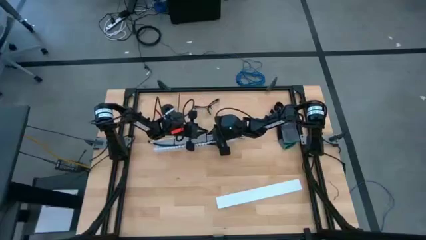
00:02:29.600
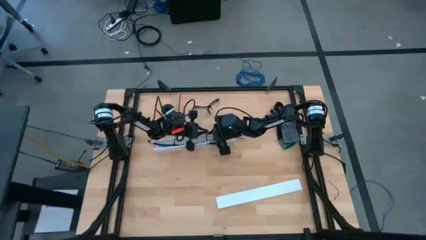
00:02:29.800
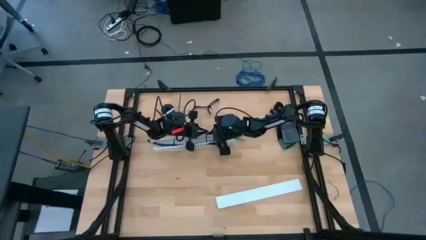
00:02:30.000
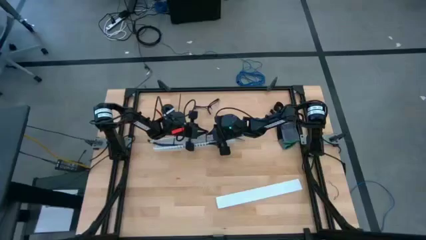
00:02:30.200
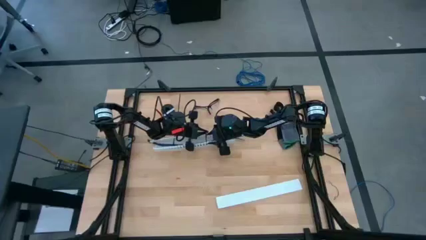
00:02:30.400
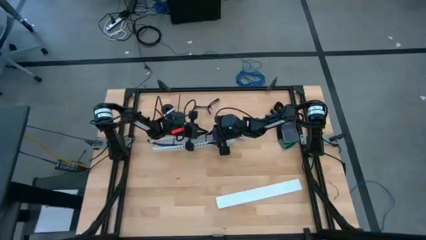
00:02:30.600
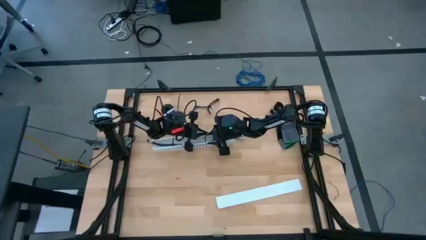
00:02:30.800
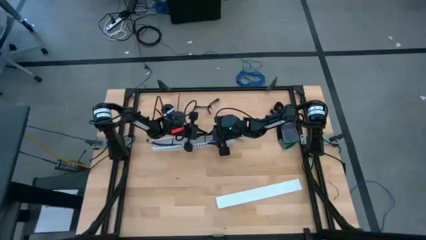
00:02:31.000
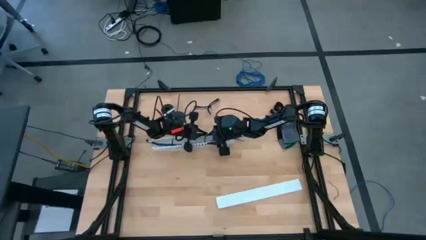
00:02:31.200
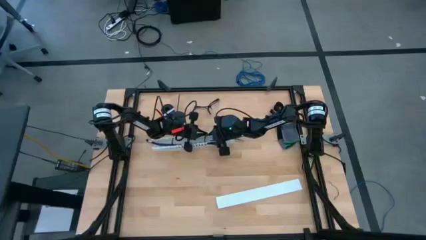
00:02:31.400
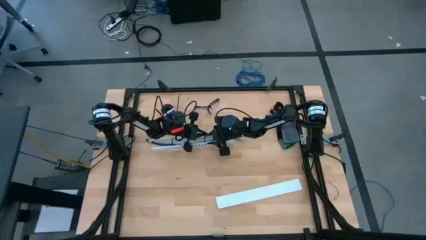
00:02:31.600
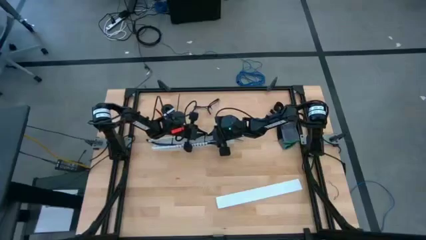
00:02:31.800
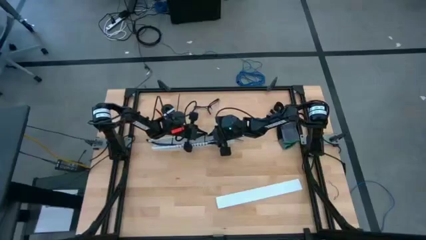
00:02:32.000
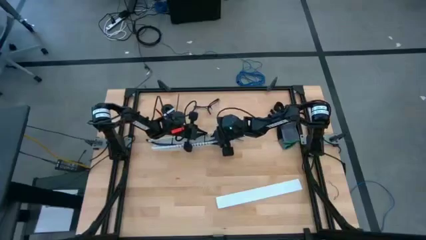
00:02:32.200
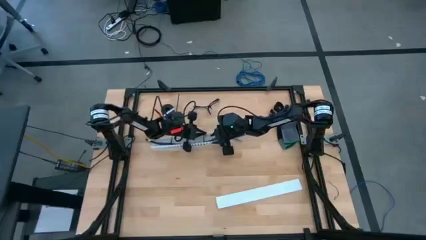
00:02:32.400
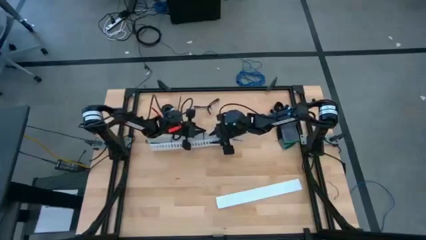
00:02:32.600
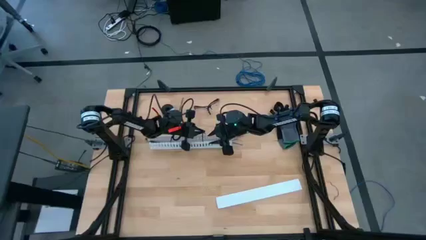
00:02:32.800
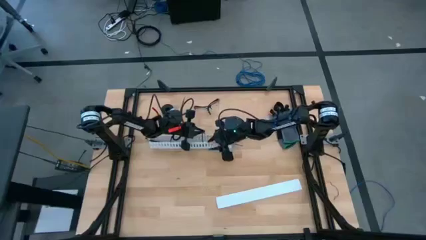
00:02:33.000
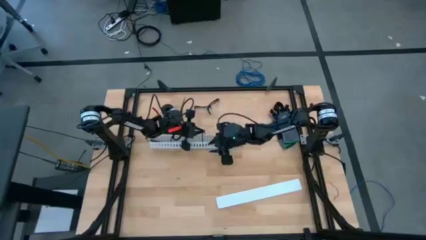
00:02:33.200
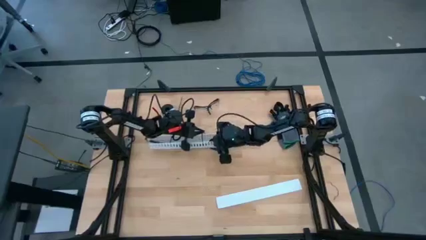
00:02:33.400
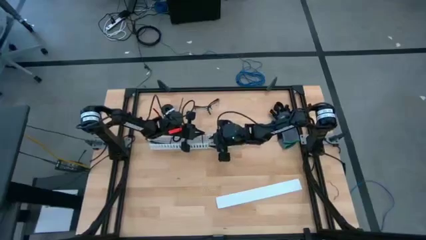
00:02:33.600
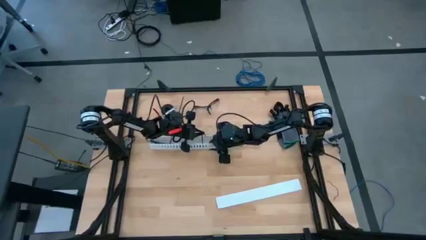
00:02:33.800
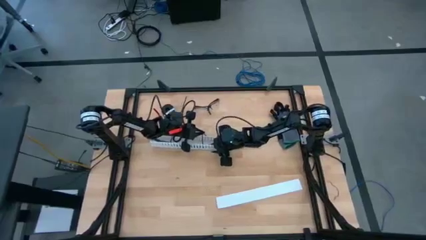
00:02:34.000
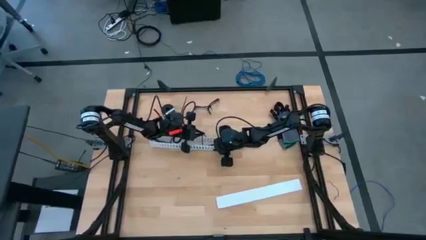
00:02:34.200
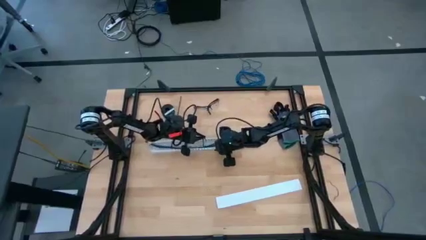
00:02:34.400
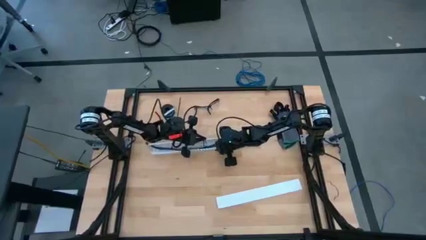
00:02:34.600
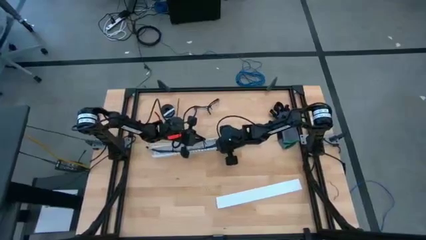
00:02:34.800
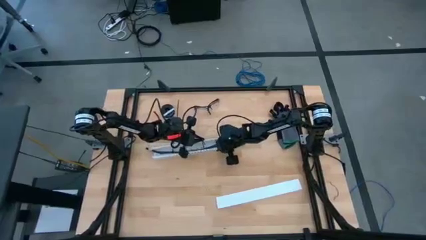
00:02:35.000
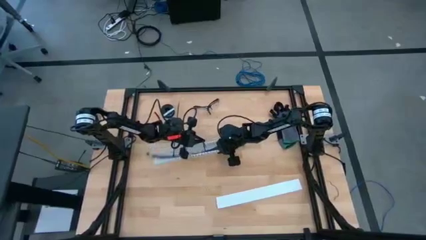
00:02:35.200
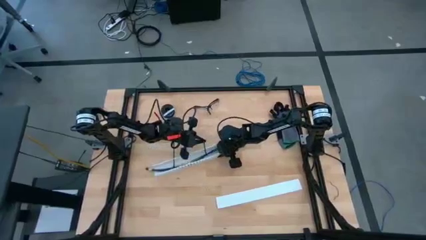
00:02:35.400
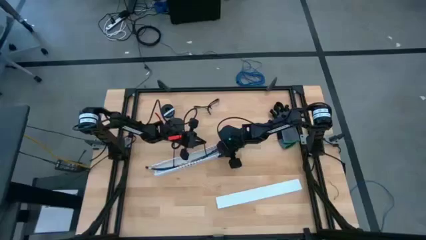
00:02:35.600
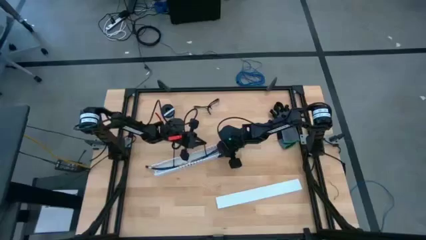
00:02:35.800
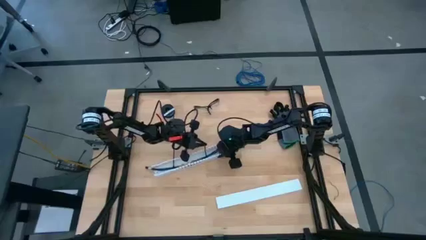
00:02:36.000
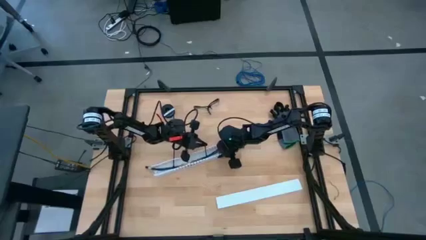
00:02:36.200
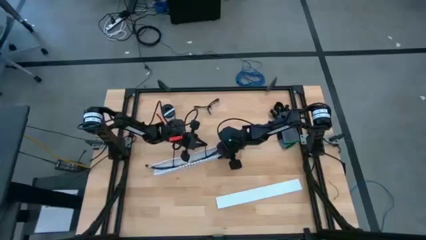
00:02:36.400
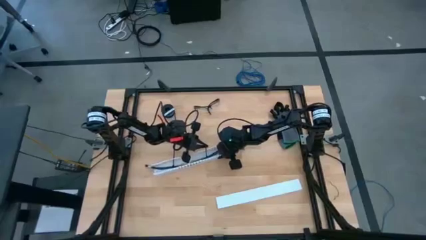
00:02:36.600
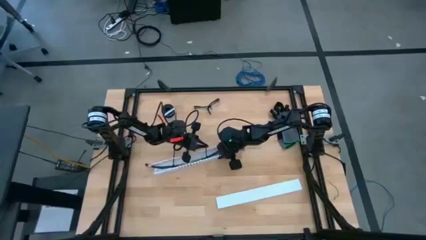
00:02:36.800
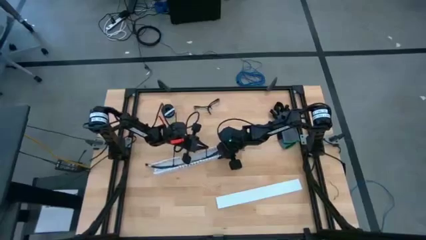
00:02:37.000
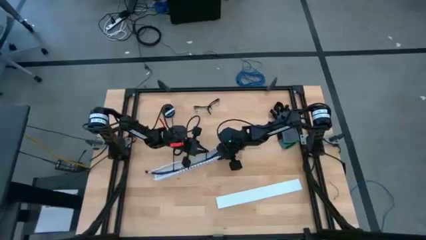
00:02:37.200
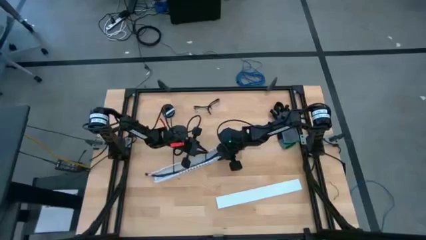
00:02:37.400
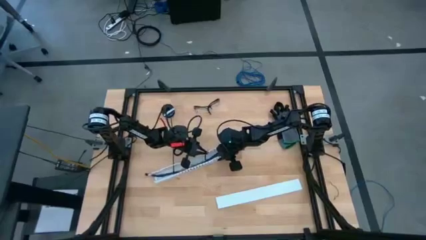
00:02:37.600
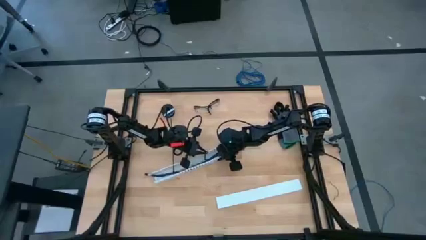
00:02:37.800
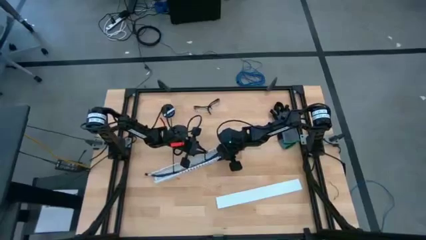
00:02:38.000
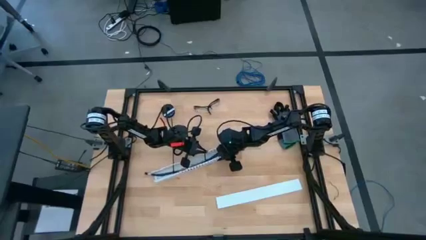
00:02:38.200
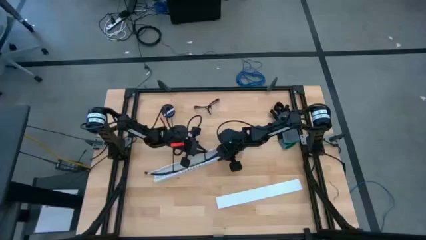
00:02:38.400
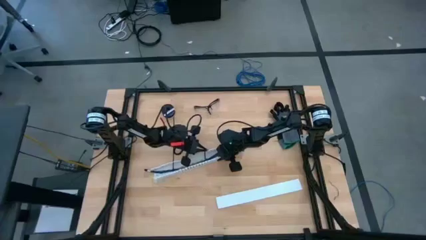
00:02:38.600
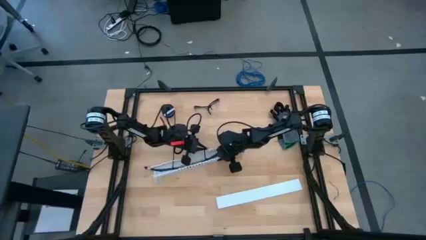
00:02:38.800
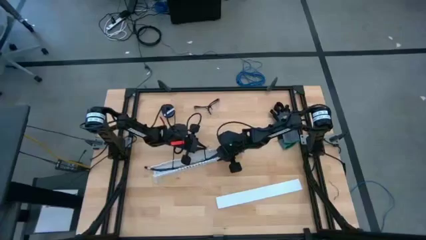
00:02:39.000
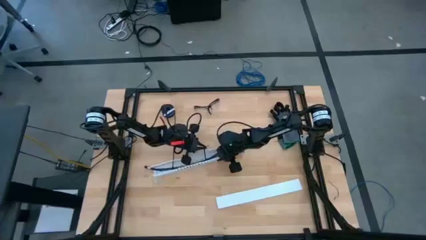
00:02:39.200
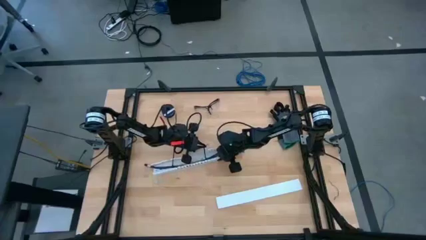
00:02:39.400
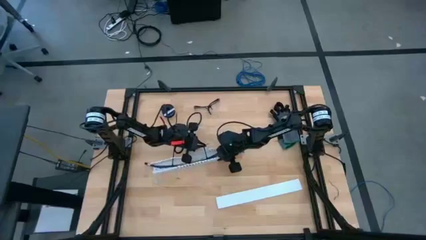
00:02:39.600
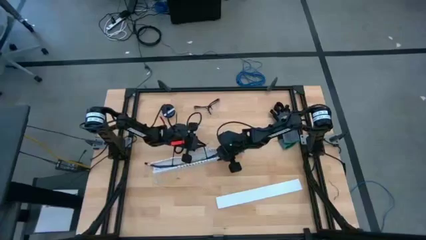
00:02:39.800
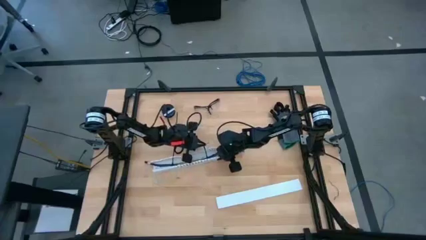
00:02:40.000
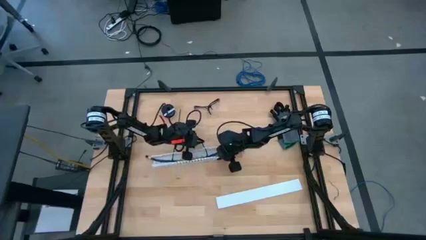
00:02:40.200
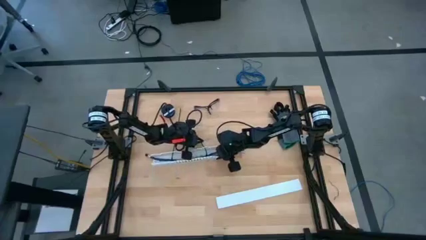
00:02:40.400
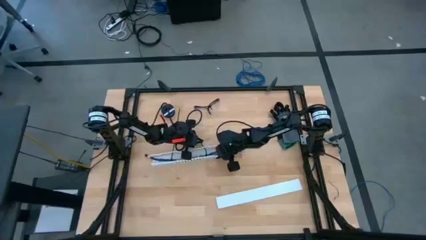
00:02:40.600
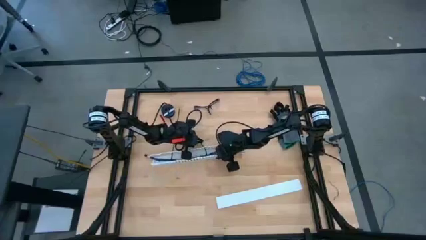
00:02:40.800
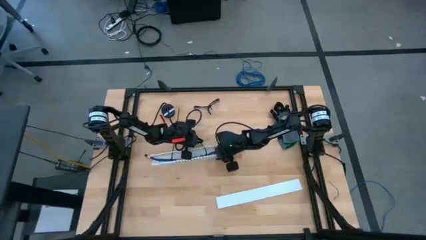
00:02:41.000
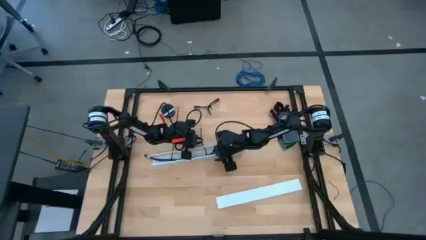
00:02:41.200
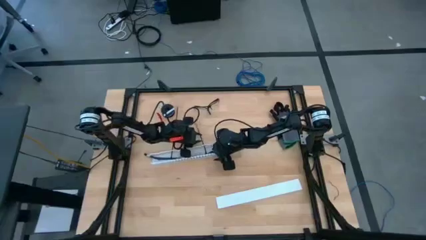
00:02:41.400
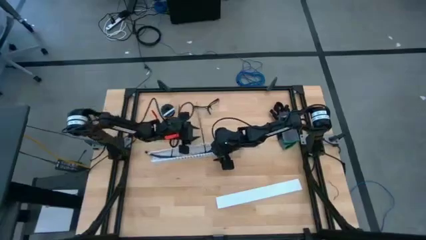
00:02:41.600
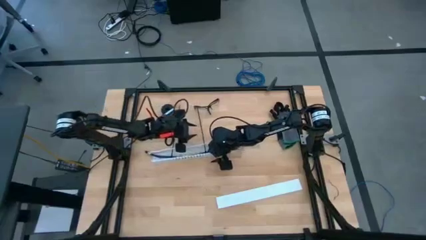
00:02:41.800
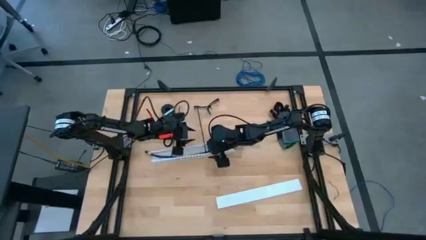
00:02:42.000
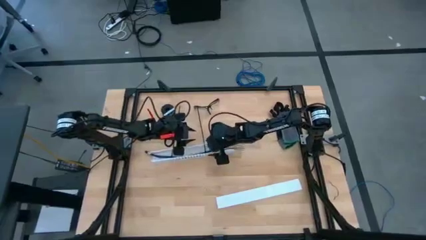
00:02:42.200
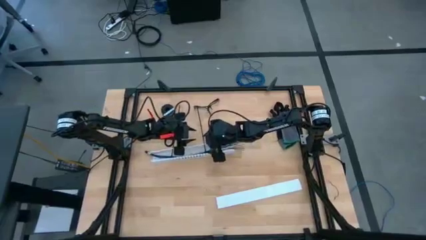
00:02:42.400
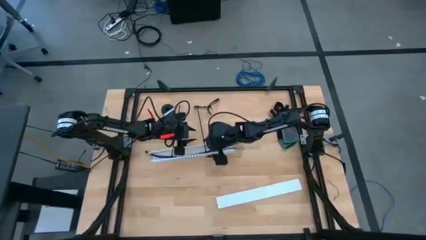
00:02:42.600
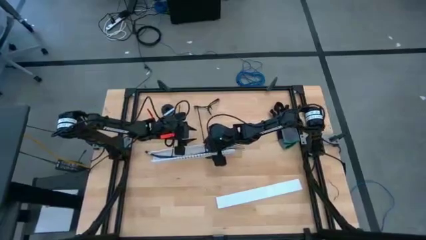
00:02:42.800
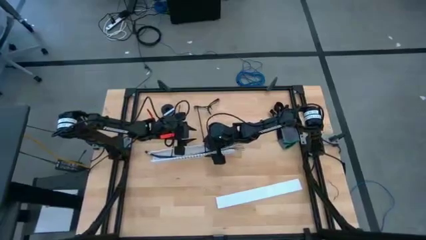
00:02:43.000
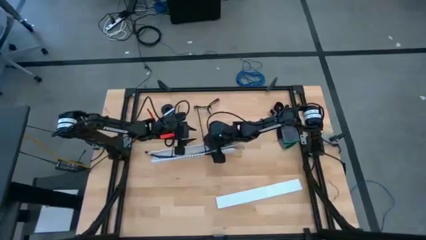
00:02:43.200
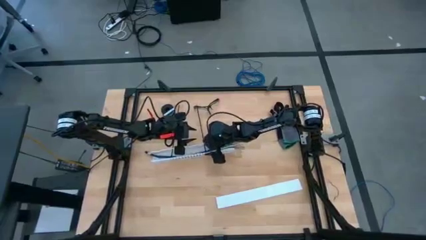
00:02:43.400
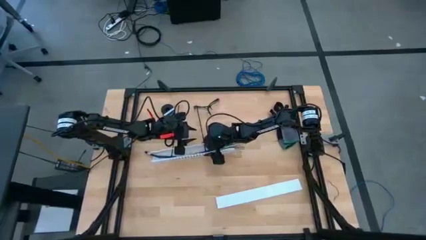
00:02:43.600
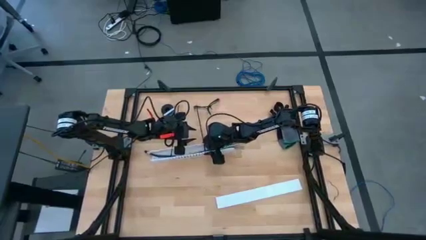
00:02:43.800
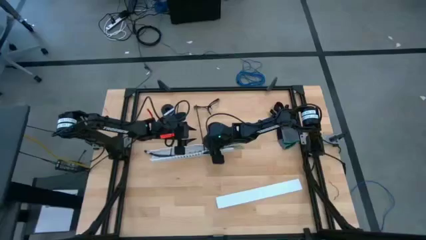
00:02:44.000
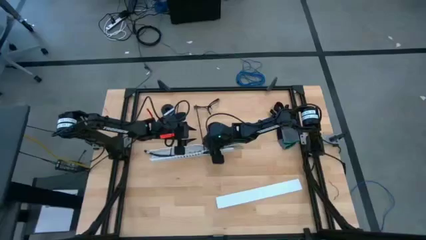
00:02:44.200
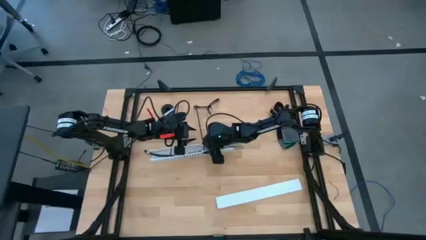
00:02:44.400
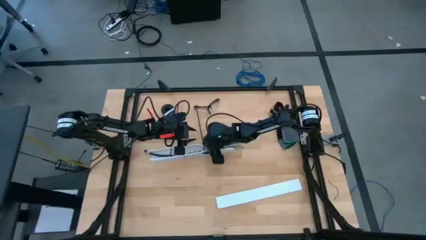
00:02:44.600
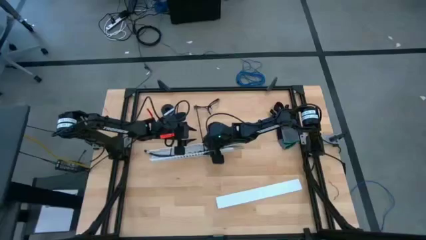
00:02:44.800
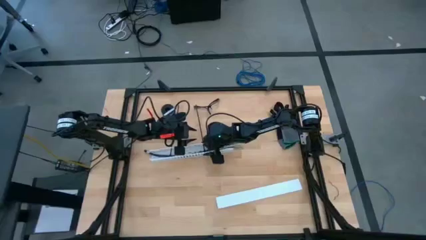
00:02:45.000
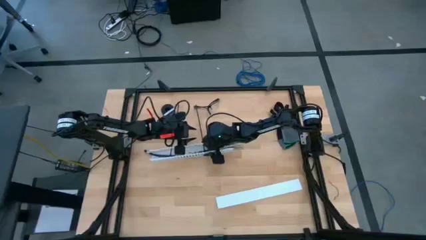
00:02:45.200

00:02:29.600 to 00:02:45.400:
Task: Ziptie cables
Put the zip tied cable wires into the white cable duct
